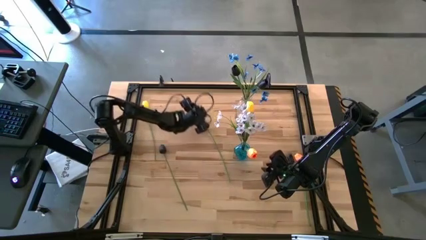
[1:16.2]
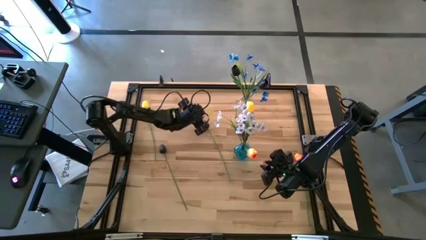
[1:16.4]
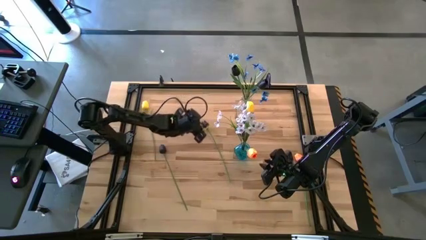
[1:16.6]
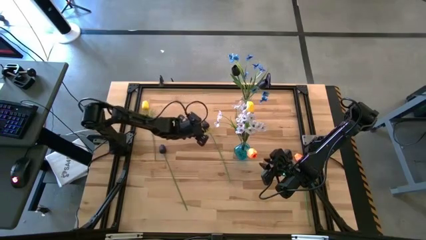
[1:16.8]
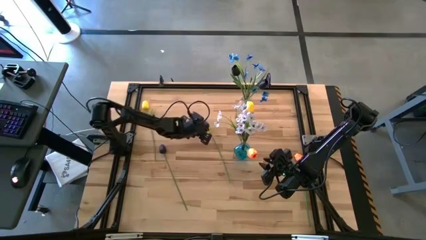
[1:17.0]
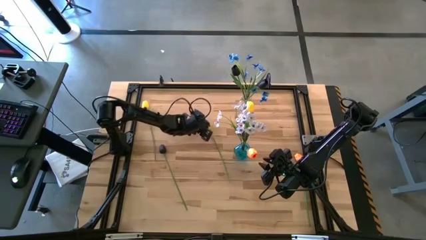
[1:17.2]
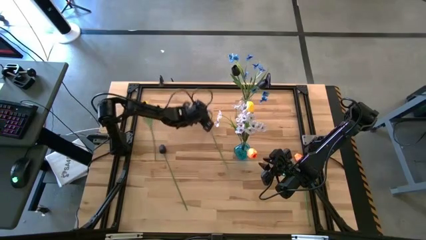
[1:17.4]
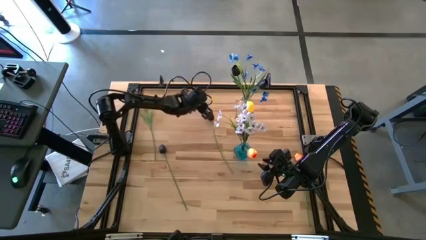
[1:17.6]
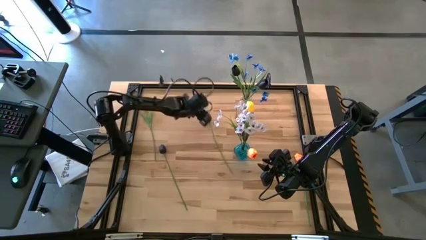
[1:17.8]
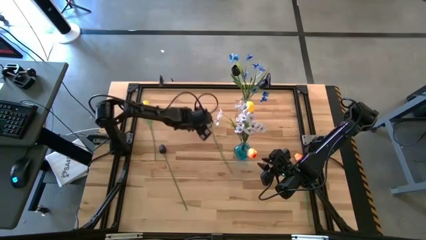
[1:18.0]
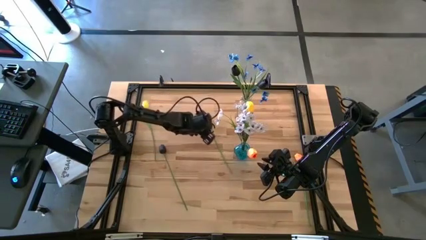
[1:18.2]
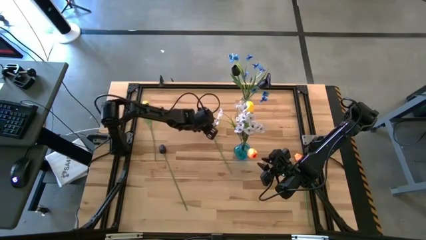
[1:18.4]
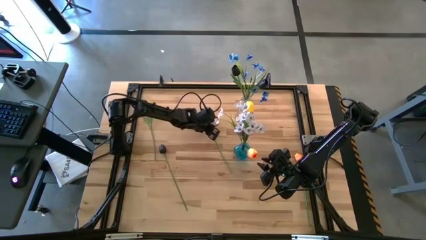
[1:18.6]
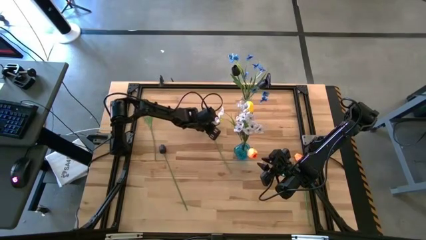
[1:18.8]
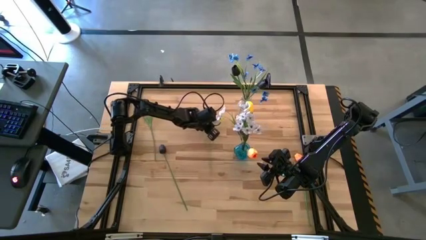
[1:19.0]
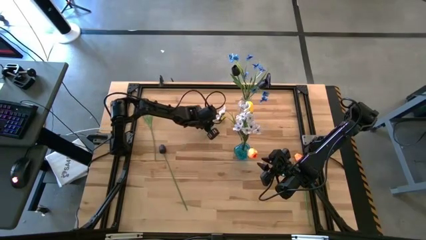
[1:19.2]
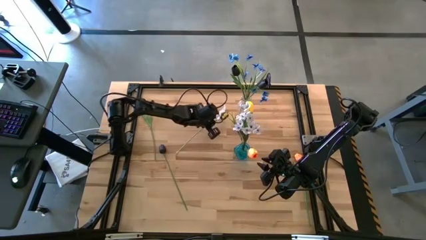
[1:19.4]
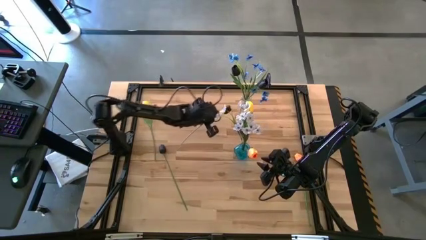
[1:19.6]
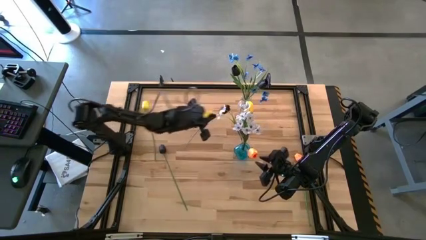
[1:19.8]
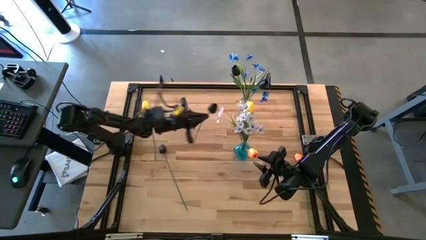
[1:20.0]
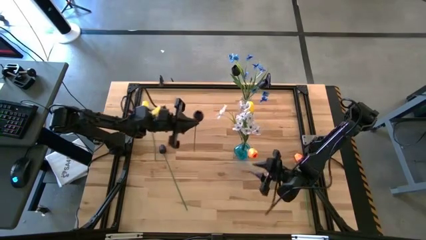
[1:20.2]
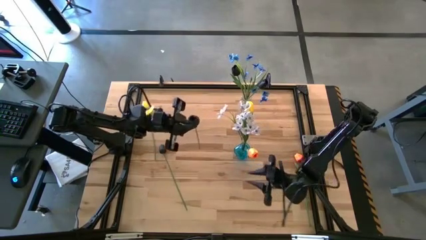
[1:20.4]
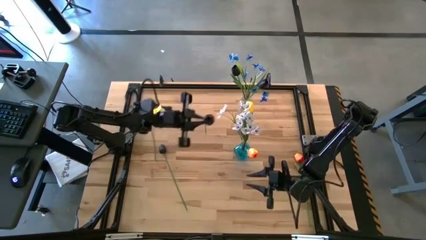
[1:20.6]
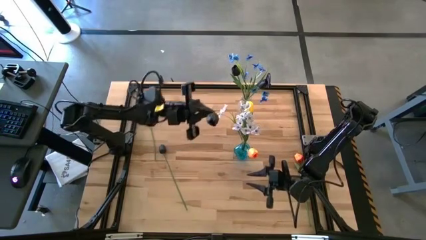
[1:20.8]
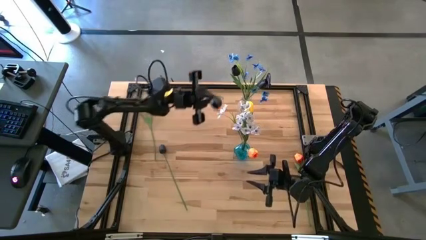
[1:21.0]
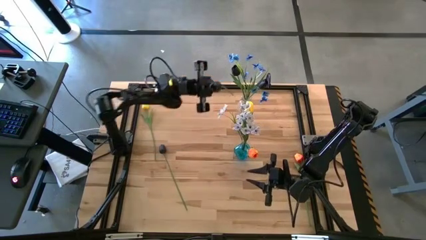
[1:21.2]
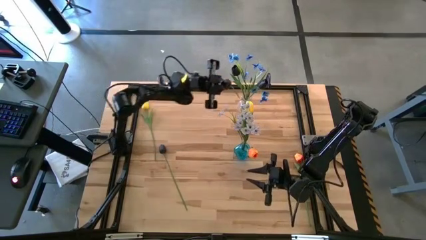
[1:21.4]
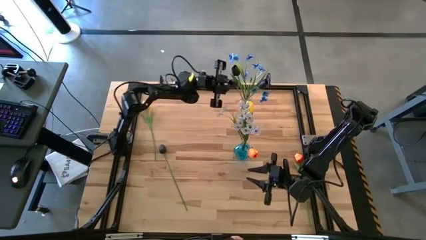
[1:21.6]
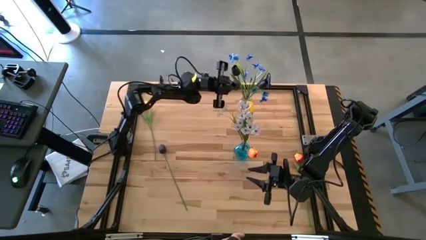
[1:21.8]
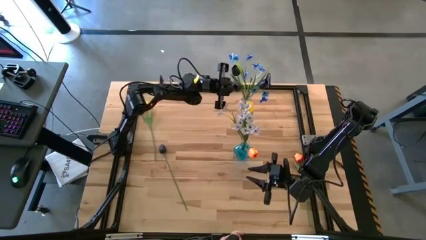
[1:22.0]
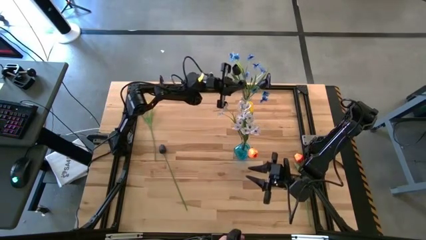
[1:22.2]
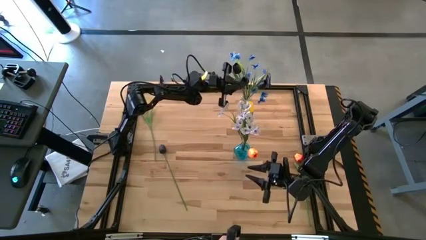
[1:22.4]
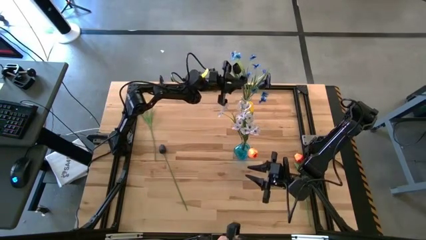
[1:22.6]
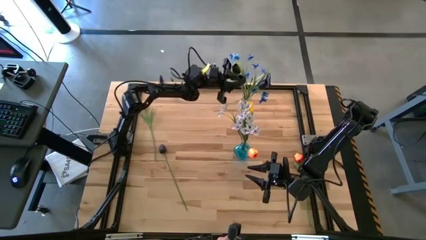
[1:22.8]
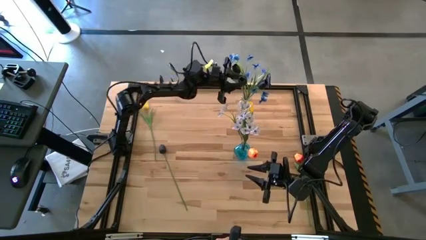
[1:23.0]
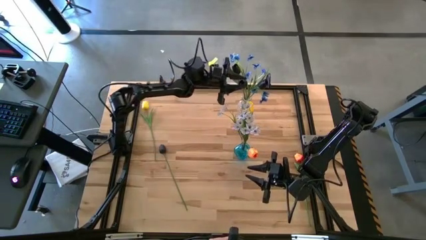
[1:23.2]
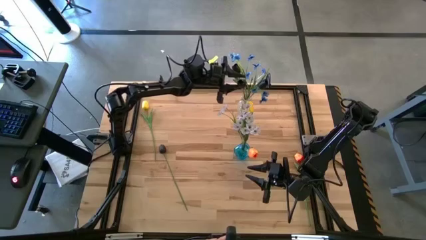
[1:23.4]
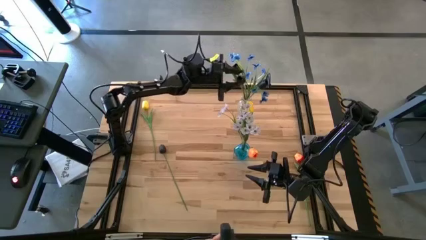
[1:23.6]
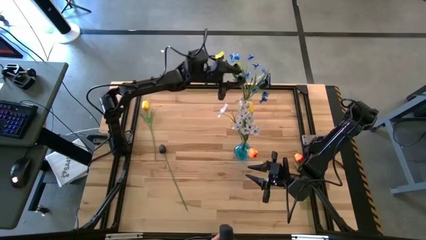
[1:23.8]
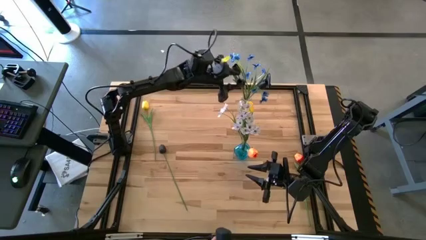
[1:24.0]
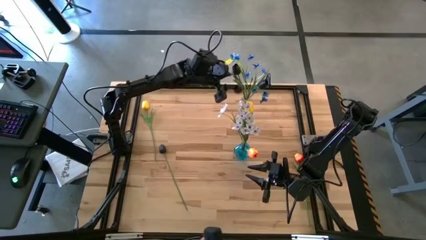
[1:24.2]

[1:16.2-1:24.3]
Task: Sort flowers into vase by color
Put the black tulip into the transparent flower vase

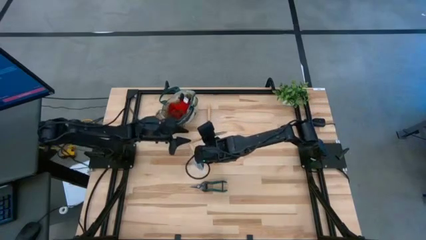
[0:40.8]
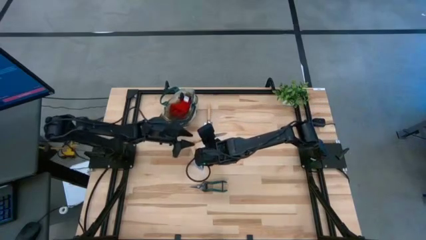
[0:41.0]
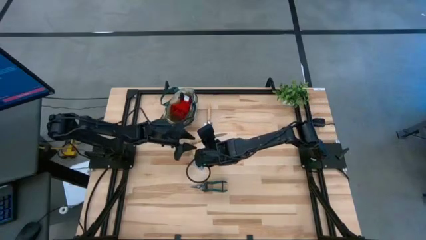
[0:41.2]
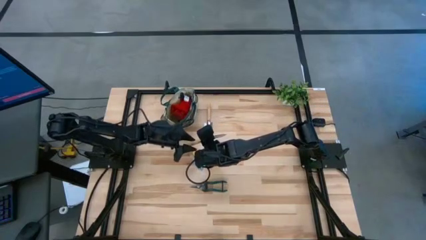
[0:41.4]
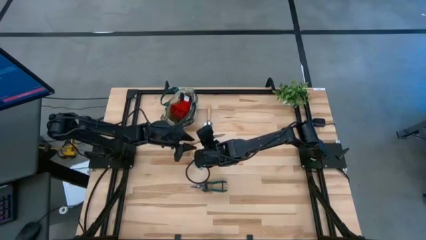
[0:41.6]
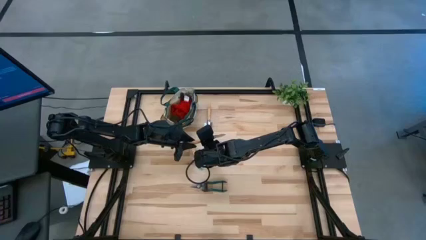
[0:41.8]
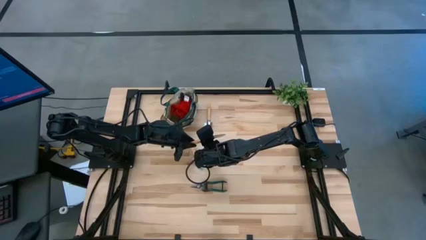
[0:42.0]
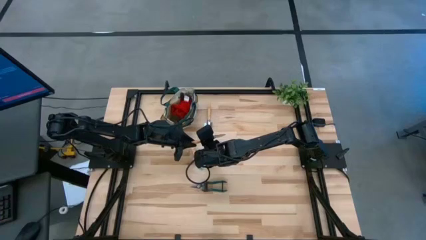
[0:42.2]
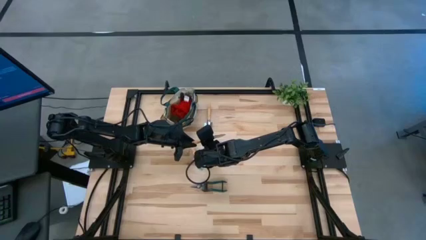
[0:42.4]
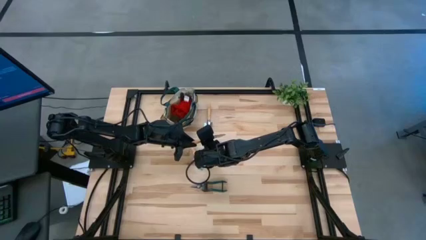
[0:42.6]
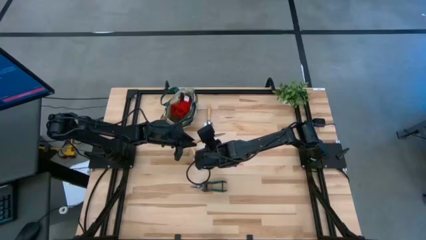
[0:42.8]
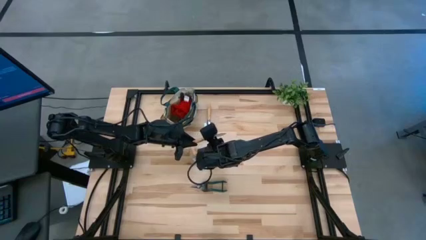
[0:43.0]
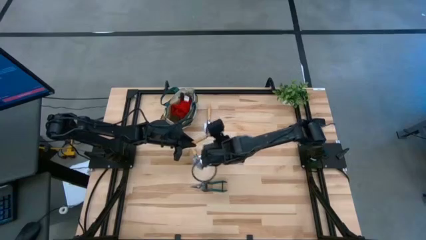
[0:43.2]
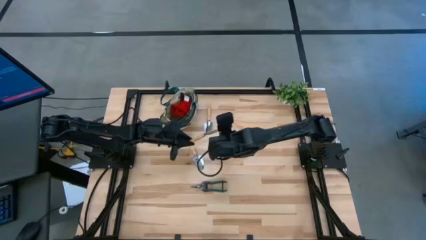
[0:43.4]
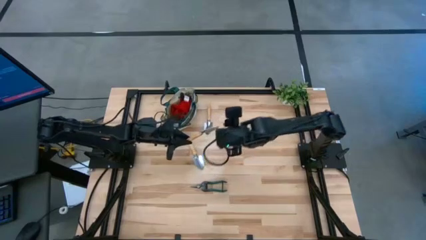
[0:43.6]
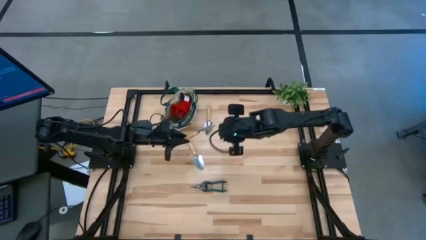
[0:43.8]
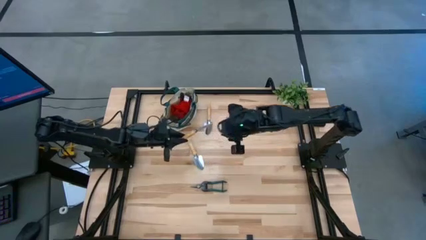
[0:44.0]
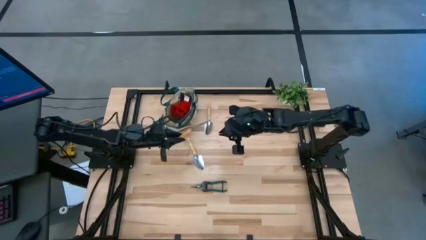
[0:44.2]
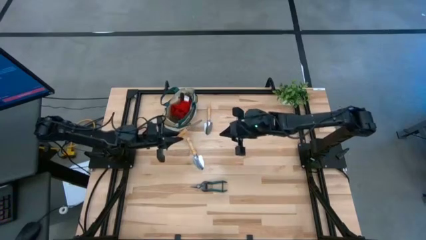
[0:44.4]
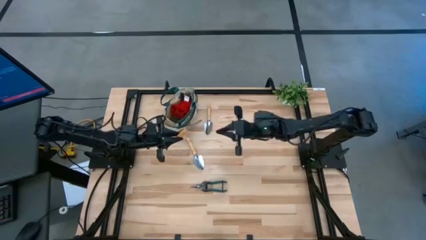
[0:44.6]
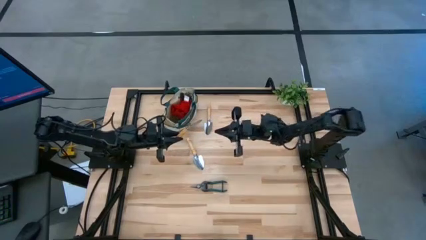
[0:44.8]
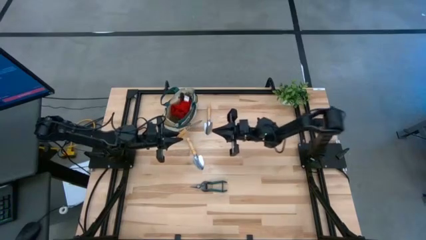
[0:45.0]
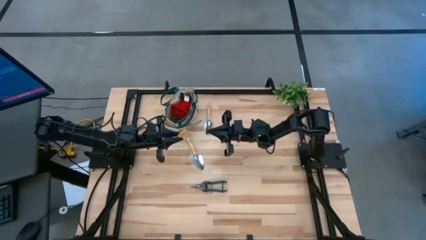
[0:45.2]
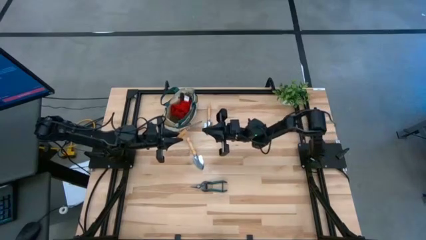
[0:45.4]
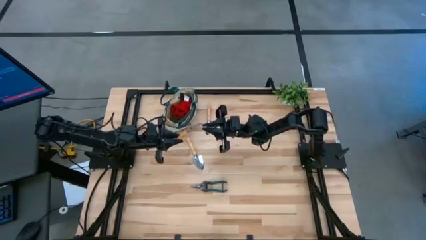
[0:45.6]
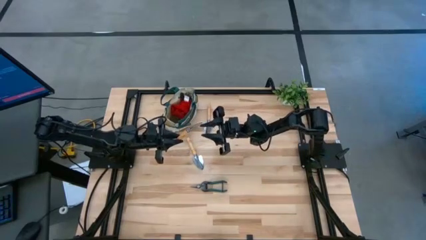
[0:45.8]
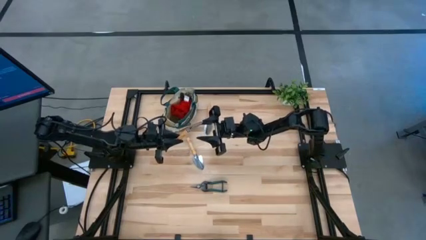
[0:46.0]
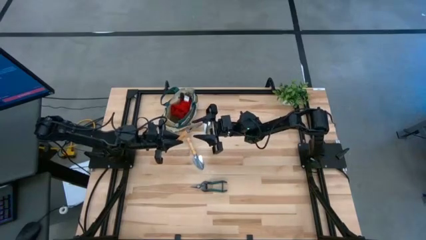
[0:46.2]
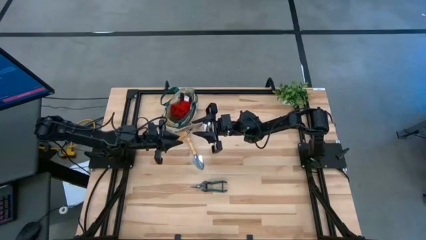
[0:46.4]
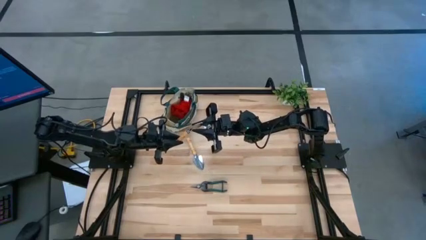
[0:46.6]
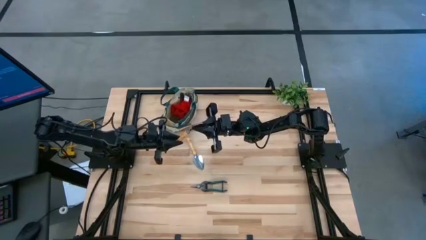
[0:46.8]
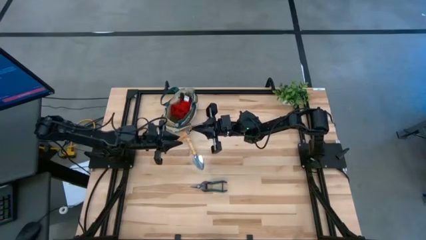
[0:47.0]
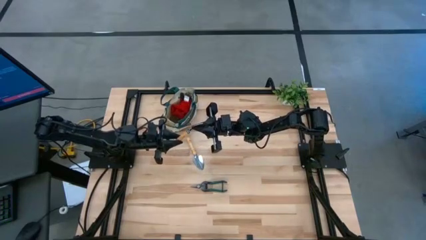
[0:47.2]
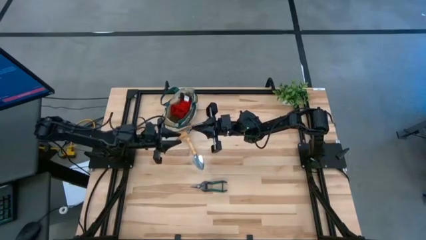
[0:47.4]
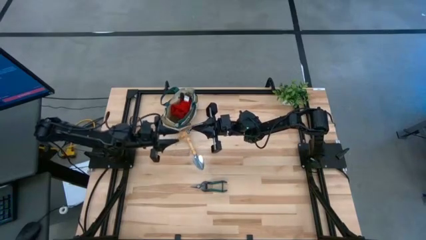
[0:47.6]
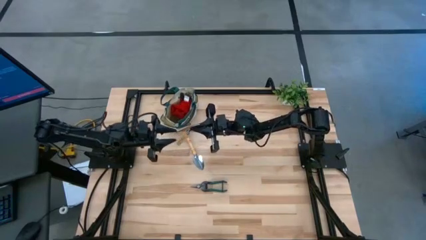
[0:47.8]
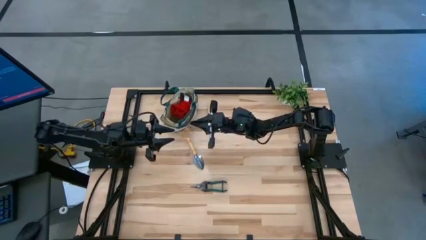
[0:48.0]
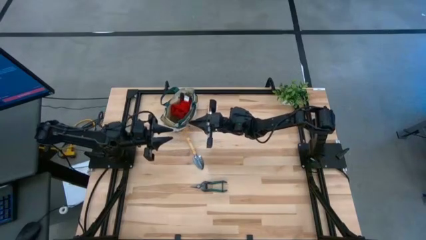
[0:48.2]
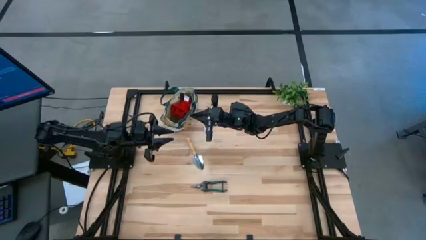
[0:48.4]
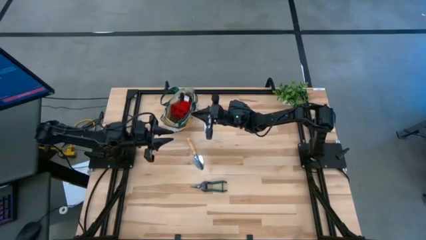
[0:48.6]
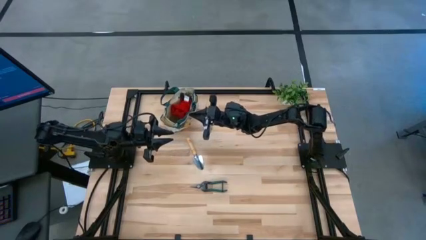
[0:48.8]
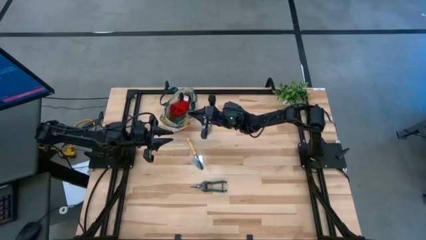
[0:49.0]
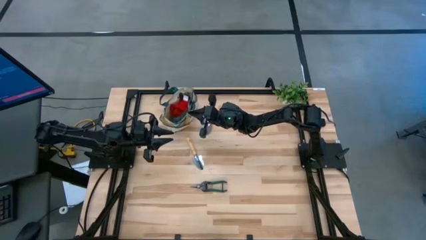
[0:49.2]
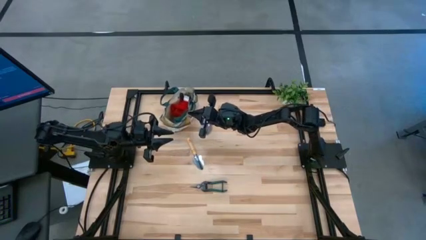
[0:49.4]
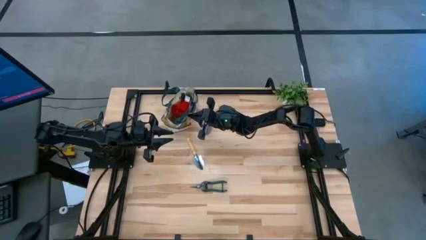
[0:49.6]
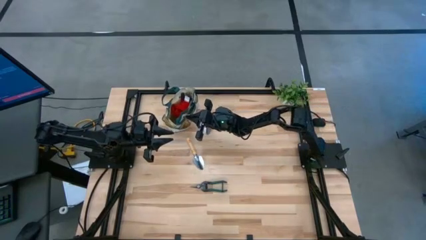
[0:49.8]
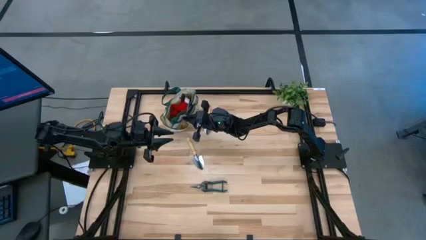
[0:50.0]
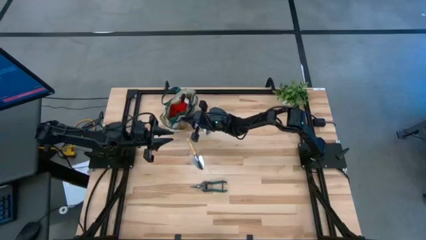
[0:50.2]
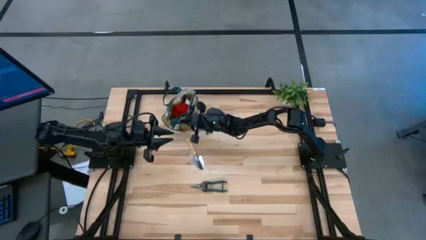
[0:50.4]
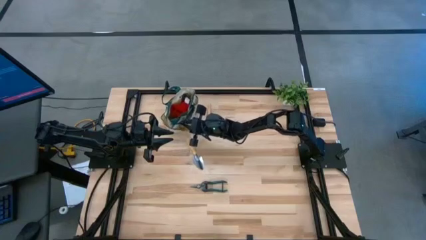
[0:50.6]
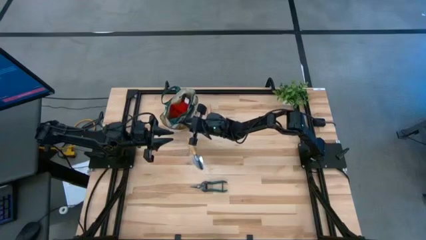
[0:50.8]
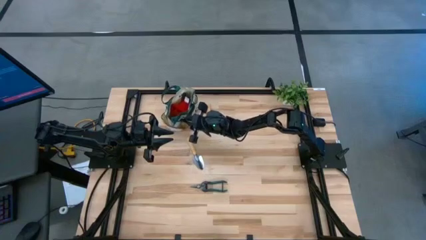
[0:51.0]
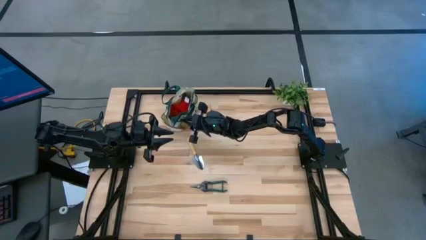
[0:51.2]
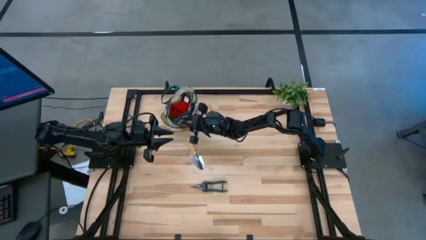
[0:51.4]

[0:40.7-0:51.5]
Task: Pick & Place Garden tools in Gardening bag
Put the bottom brown trowel into the yellow gardening bag
